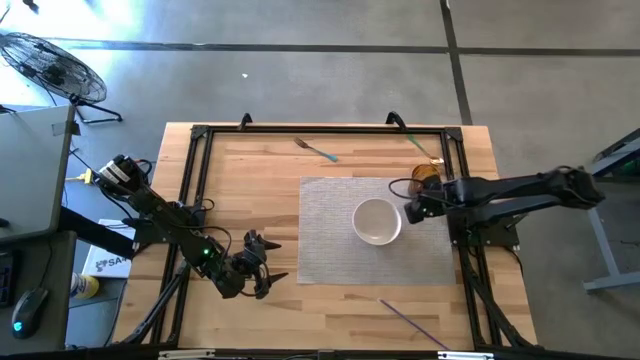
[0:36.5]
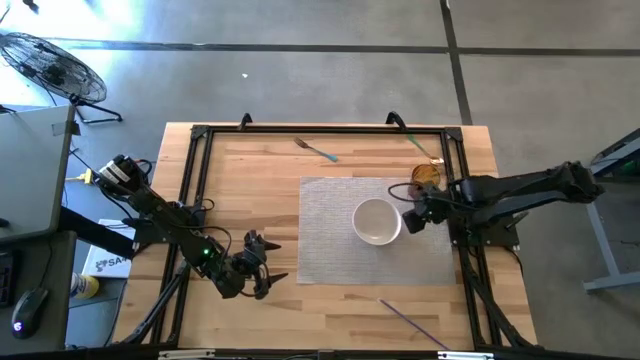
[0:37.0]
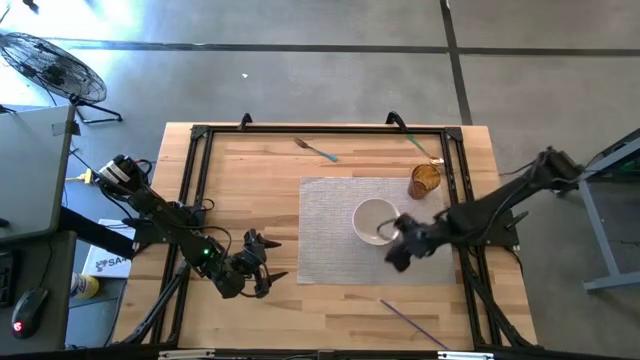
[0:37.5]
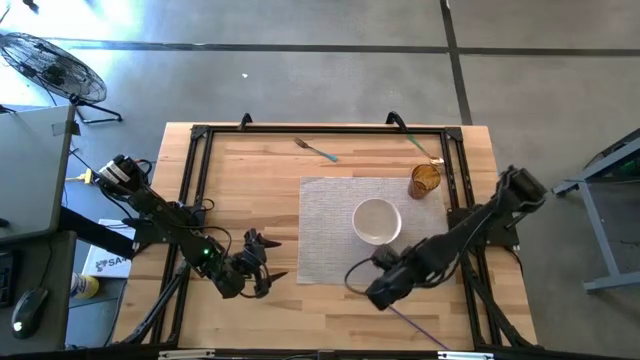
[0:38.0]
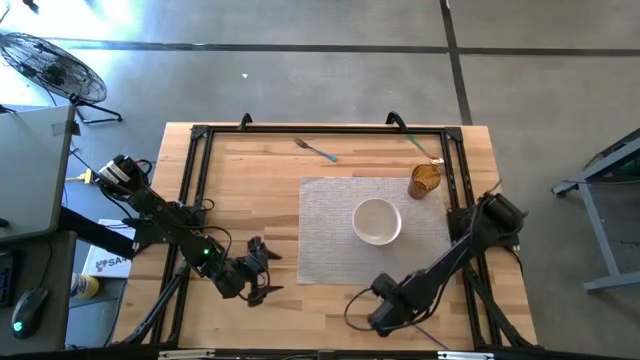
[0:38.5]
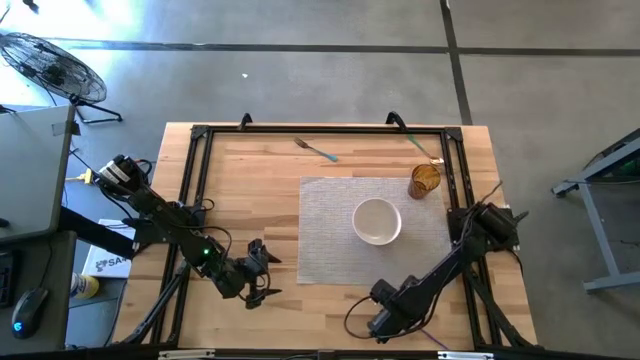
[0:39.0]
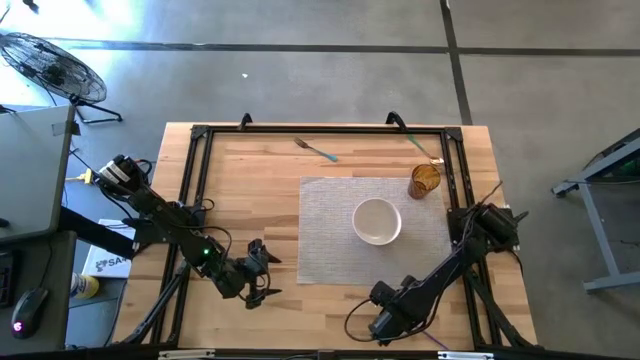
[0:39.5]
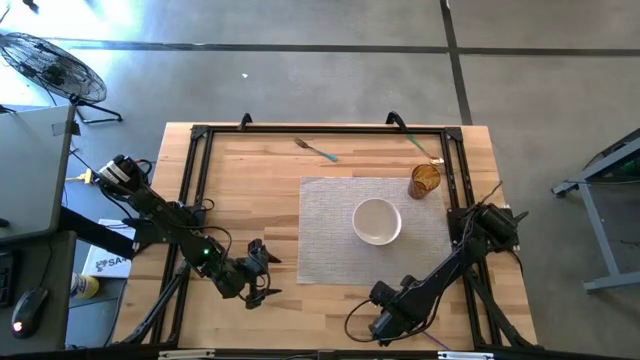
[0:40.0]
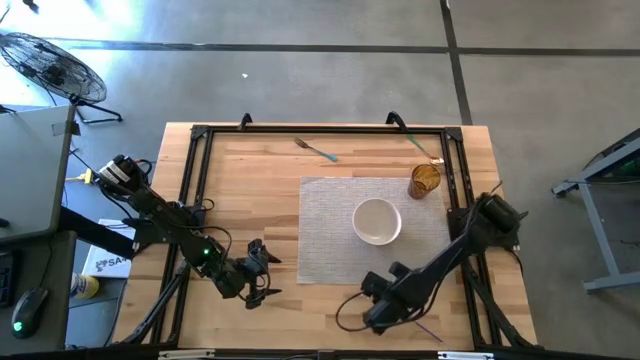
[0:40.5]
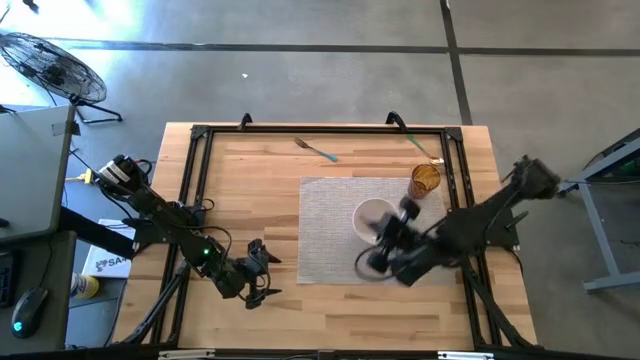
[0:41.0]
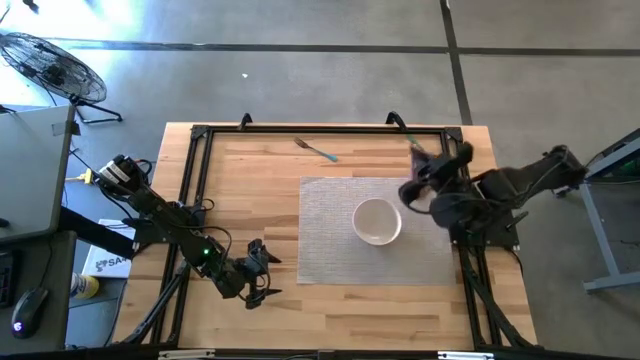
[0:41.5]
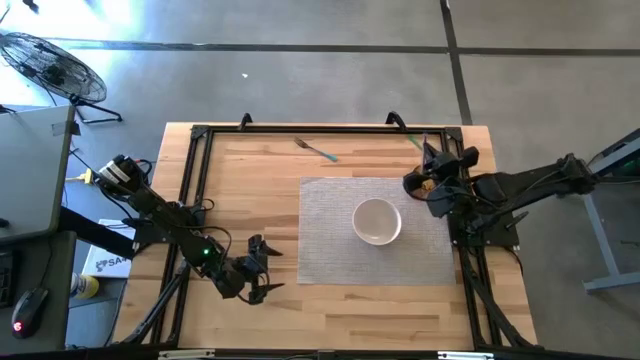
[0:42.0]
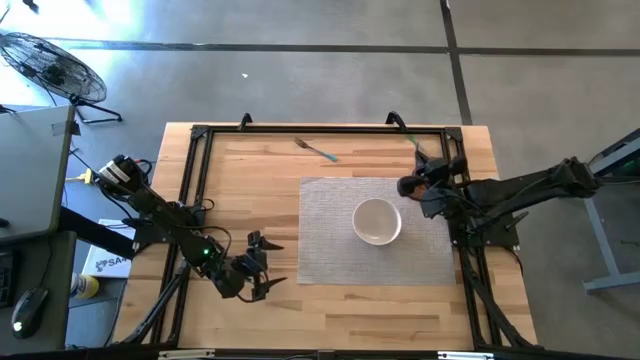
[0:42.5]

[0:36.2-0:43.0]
Task: Pick & Place Utensil
Put the purple straw into the brown cup on the gray mat

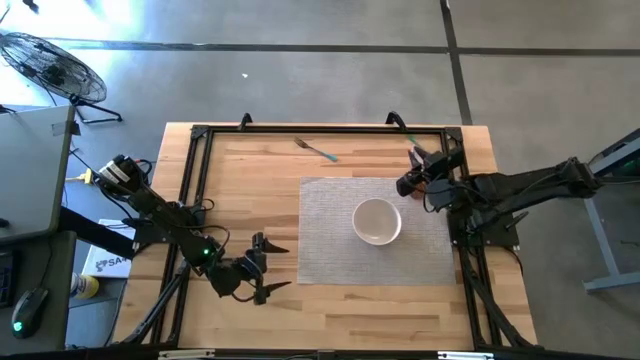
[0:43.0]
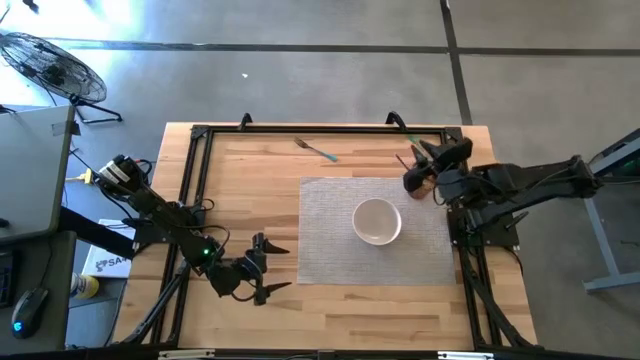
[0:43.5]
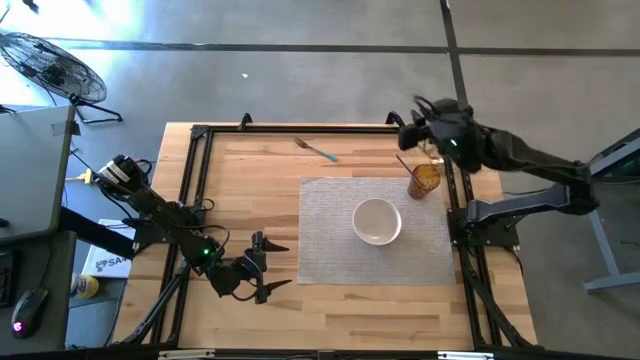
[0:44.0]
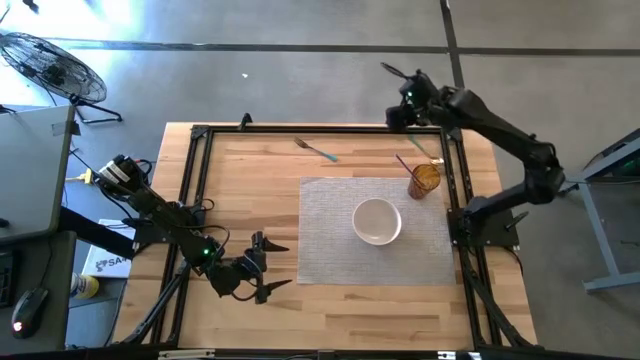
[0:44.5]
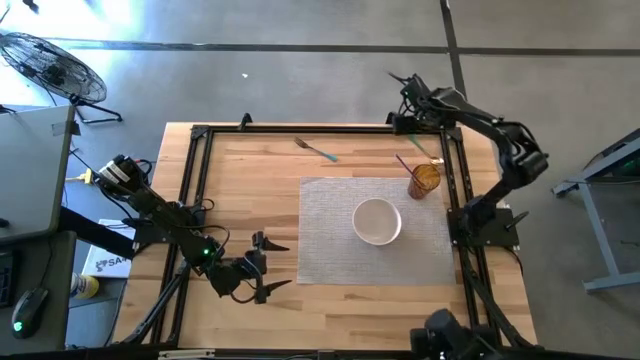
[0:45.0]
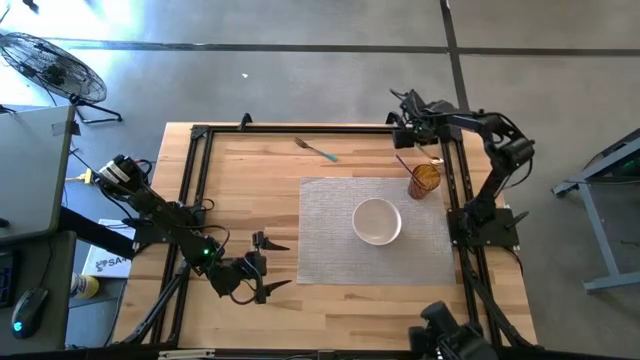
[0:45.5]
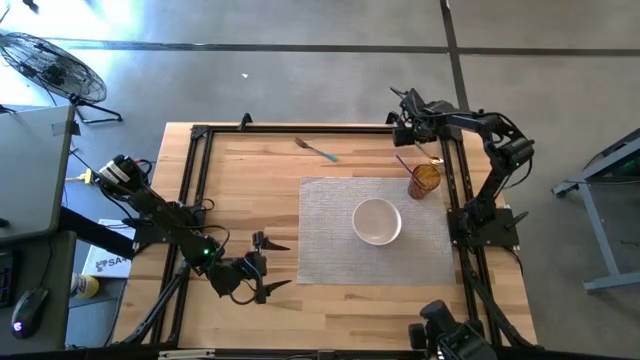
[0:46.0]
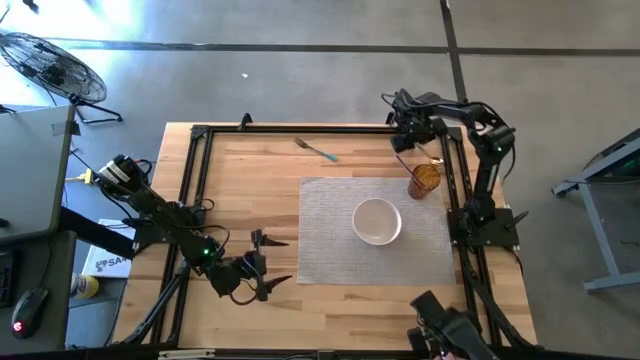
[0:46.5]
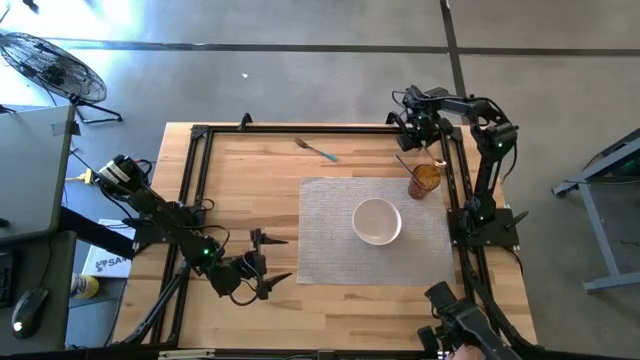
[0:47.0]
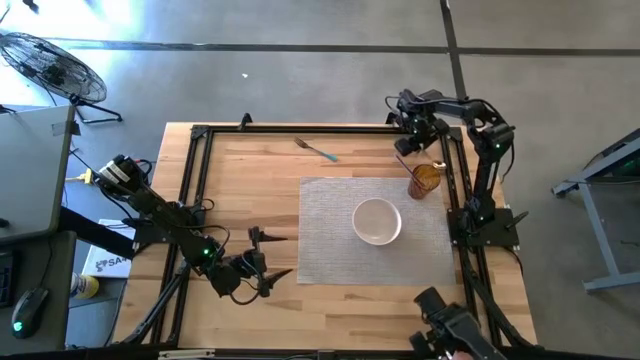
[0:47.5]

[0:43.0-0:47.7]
Put the green spoon into the white bowl on the gray mat

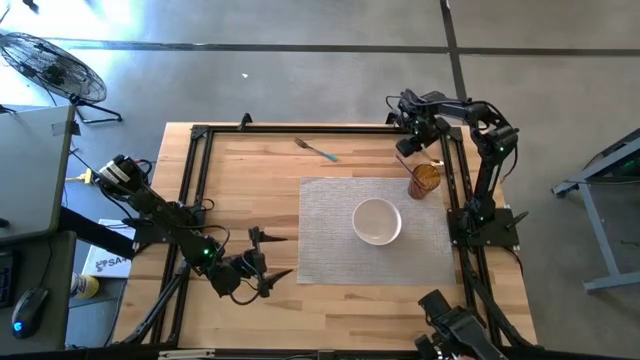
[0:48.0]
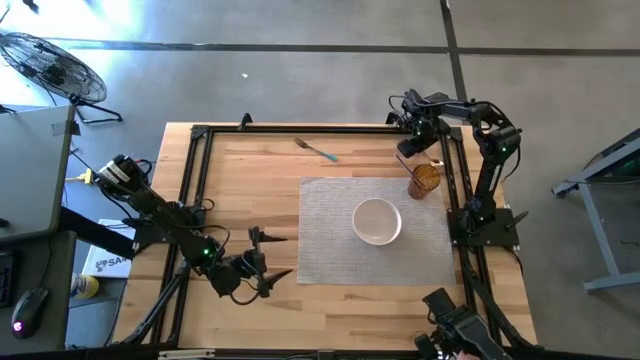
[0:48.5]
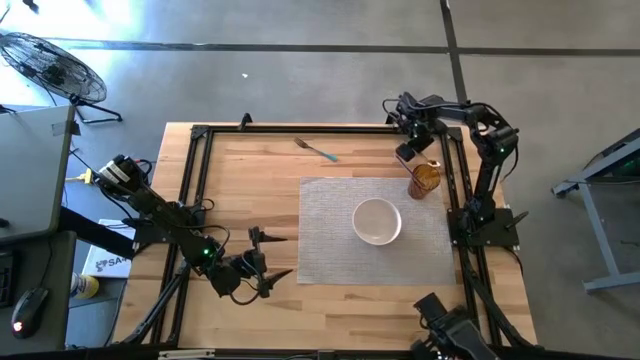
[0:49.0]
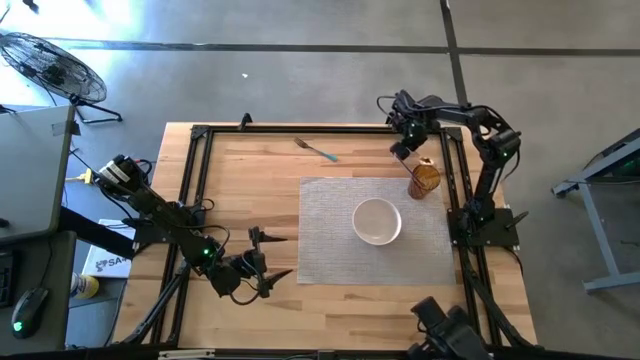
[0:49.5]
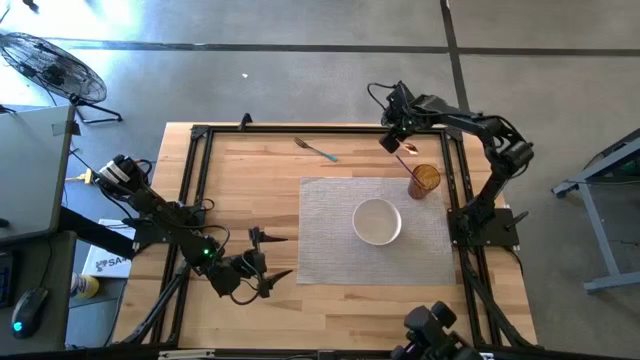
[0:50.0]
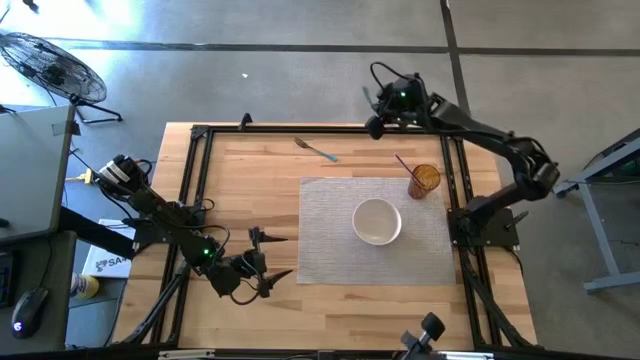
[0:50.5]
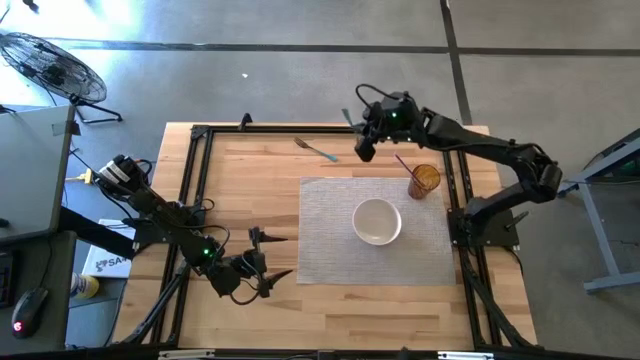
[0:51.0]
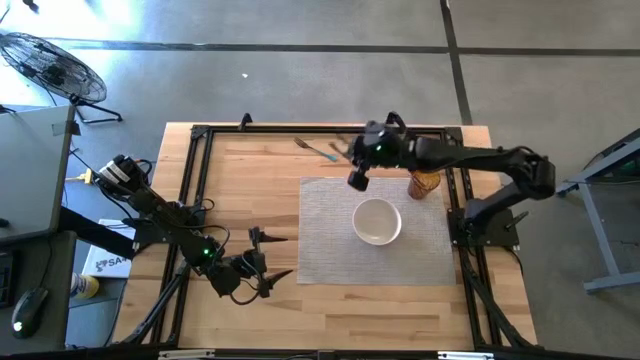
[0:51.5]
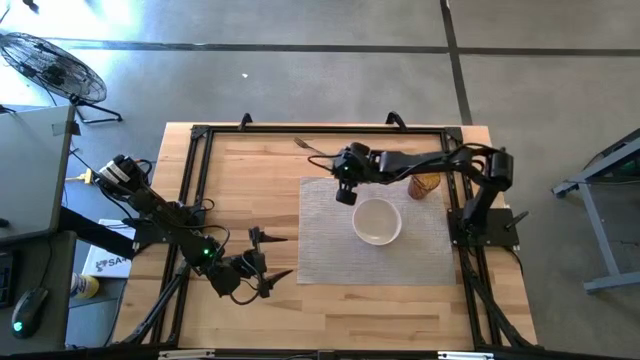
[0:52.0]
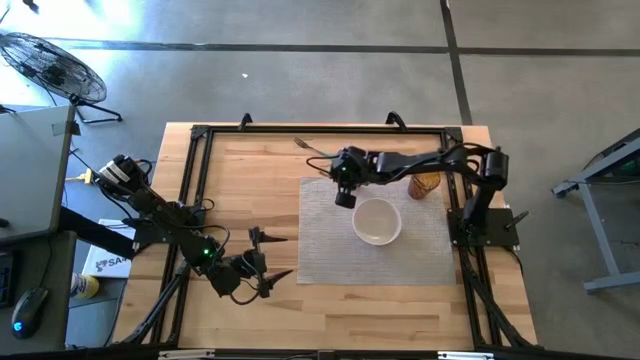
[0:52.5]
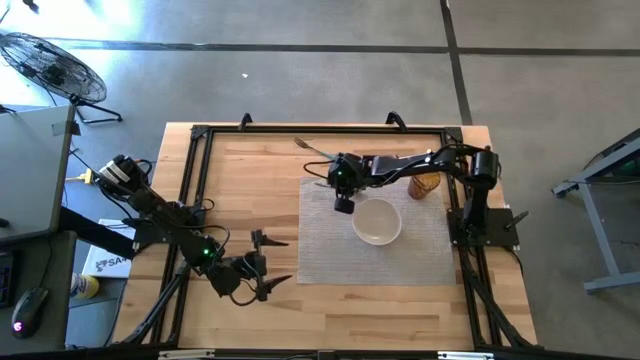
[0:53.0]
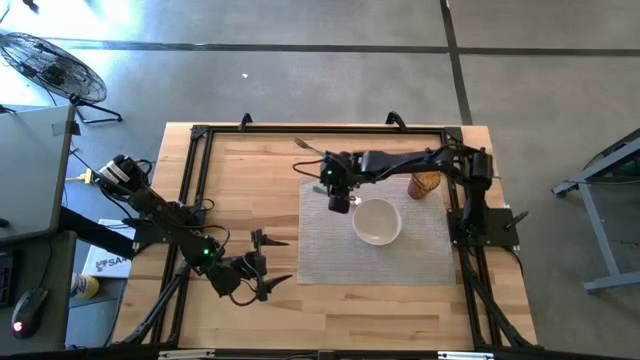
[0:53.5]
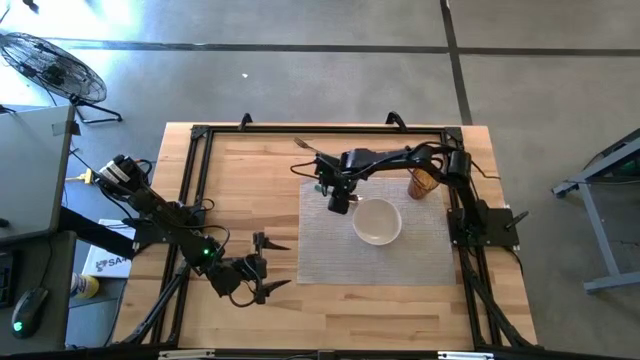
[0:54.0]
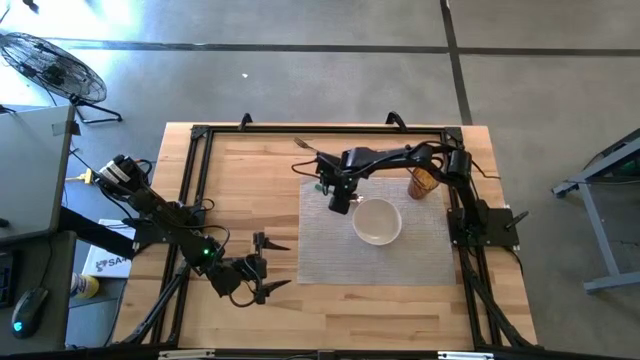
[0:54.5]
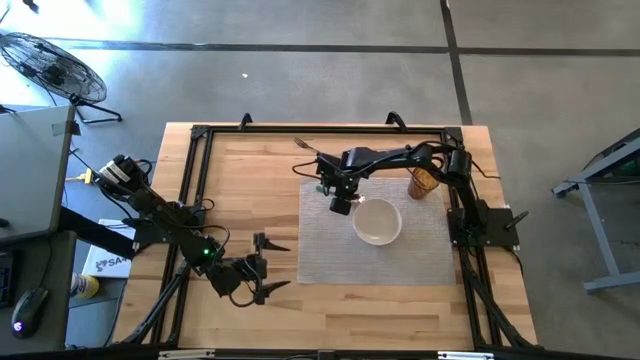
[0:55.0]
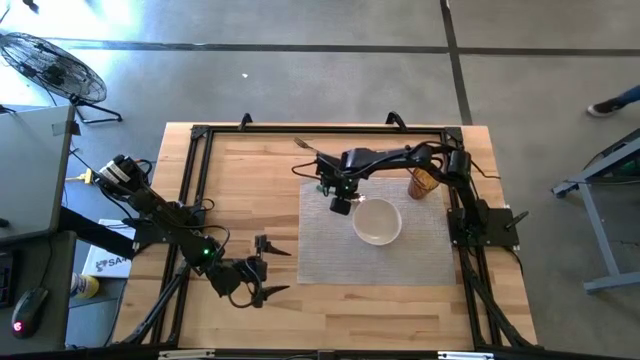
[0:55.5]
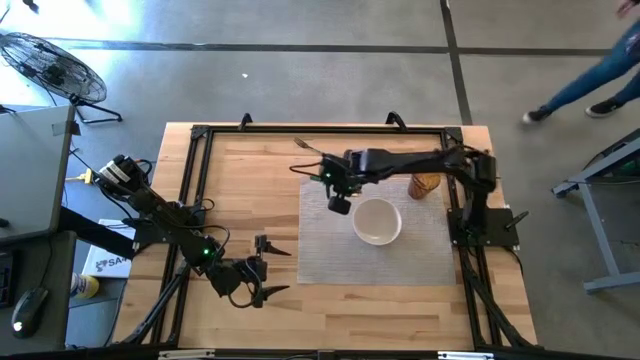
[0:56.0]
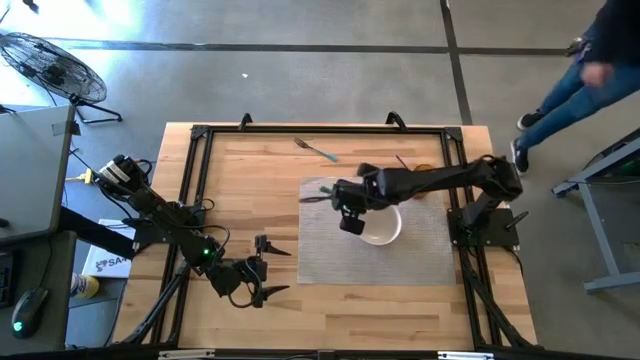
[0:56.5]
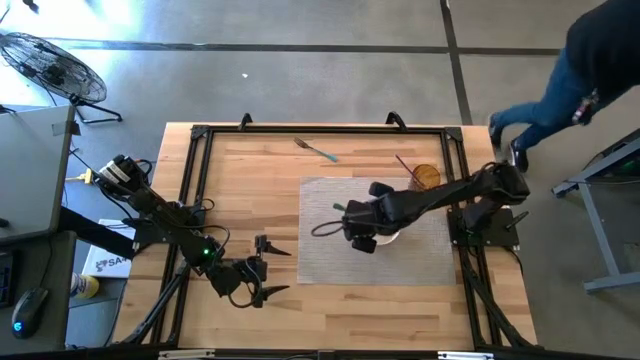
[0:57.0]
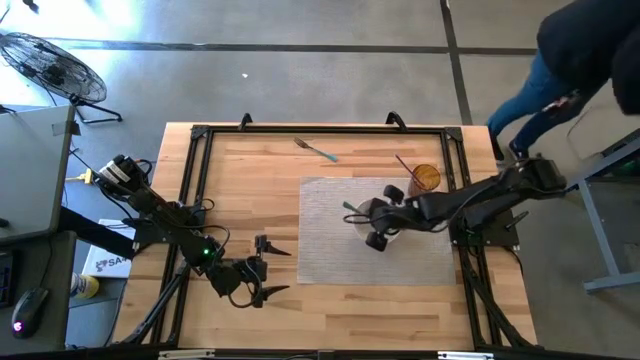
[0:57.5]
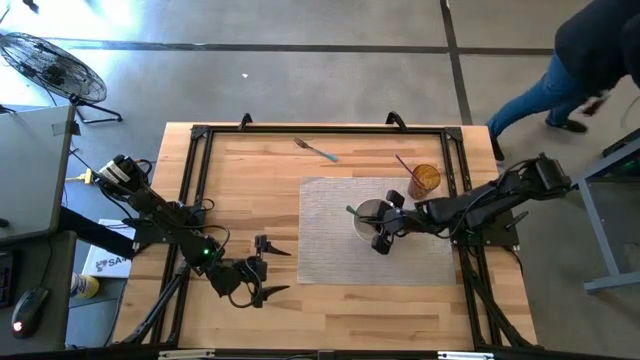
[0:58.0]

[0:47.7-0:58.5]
Put the green spoon into the white bowl on the gray mat
